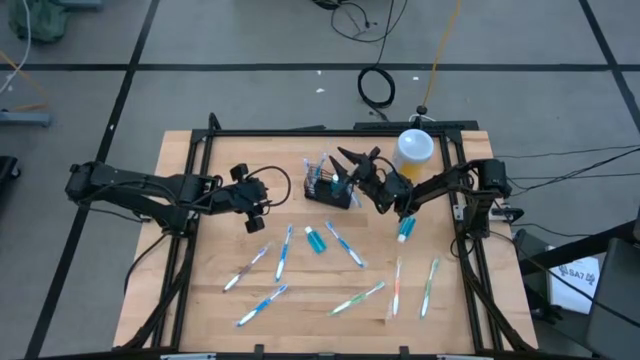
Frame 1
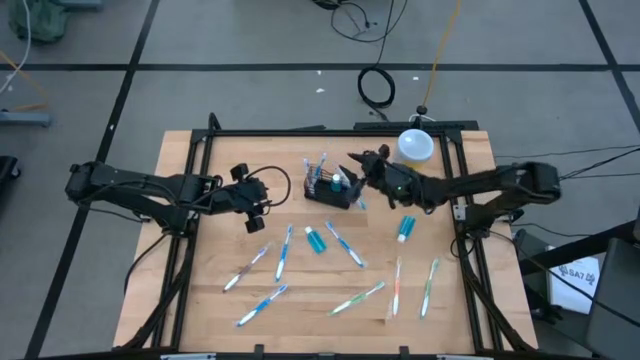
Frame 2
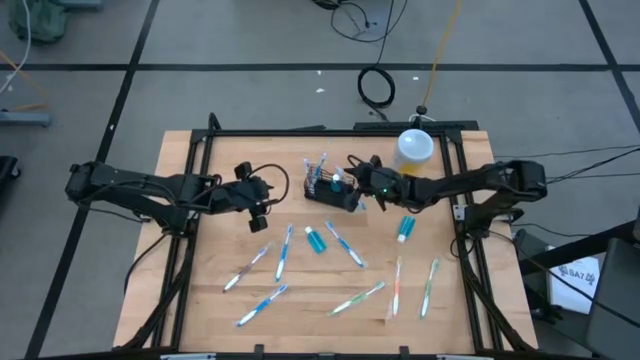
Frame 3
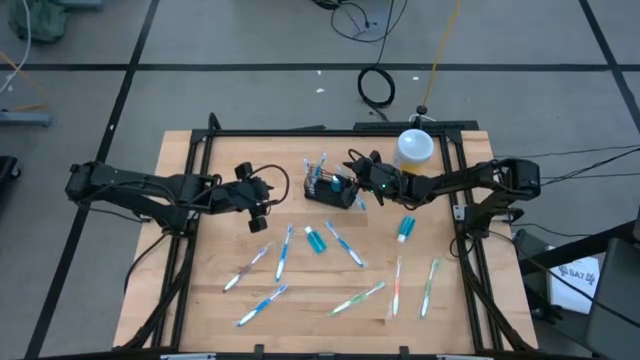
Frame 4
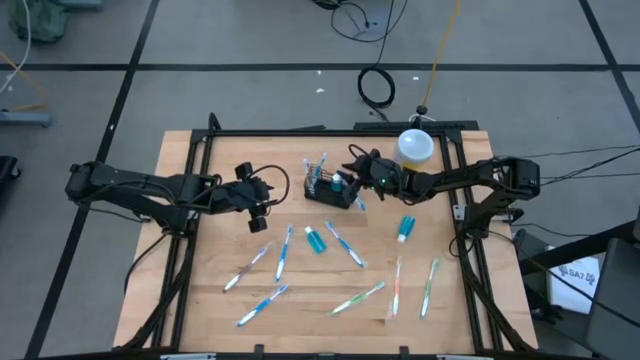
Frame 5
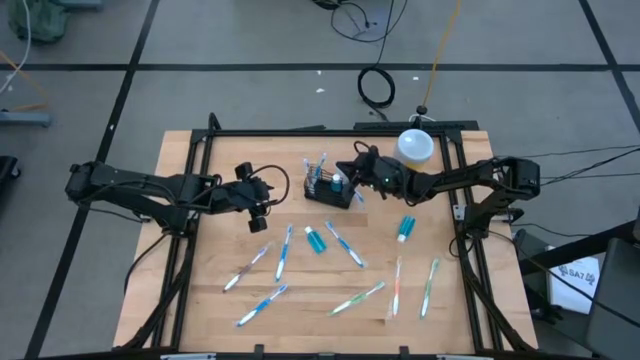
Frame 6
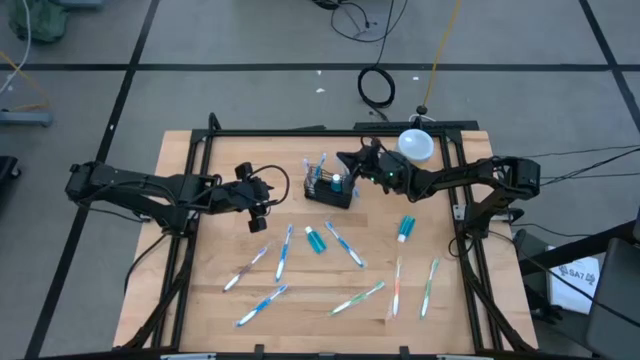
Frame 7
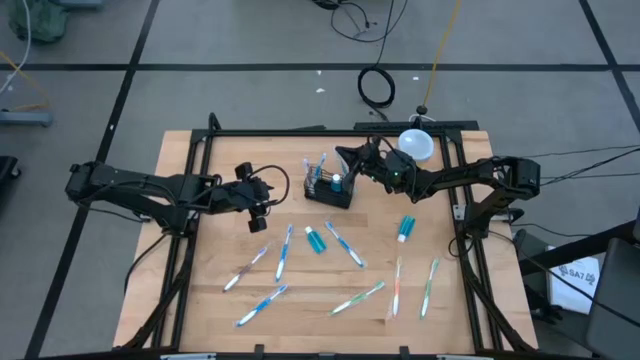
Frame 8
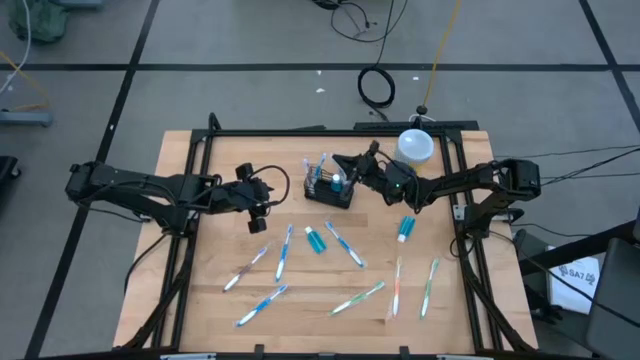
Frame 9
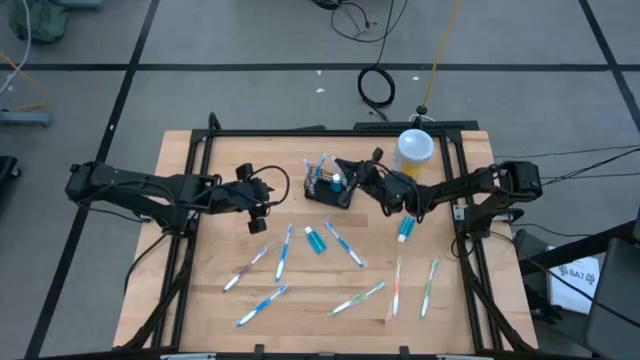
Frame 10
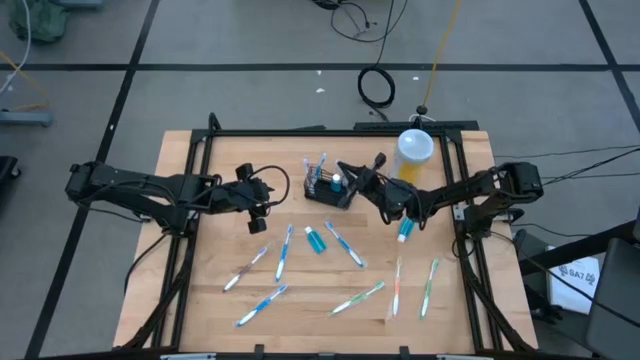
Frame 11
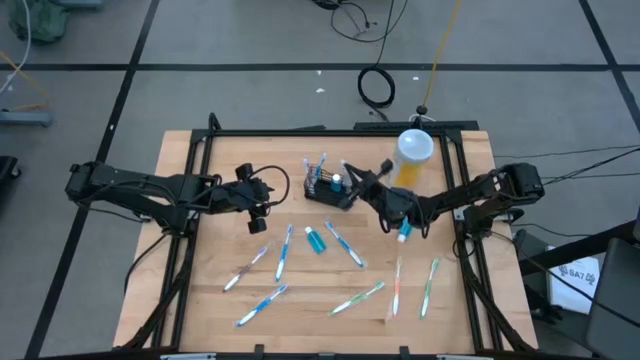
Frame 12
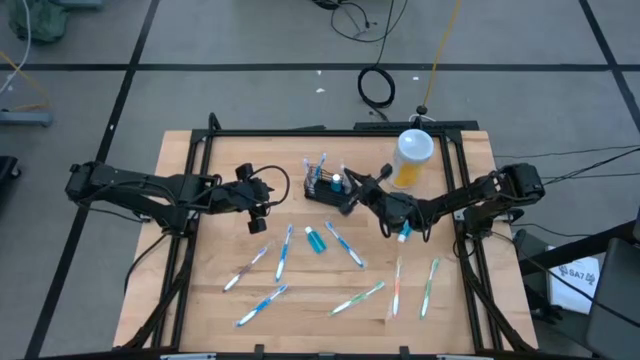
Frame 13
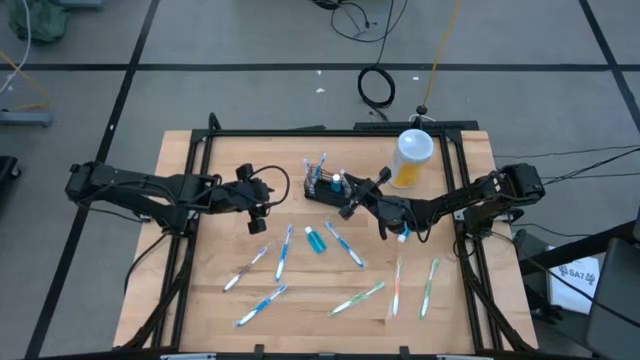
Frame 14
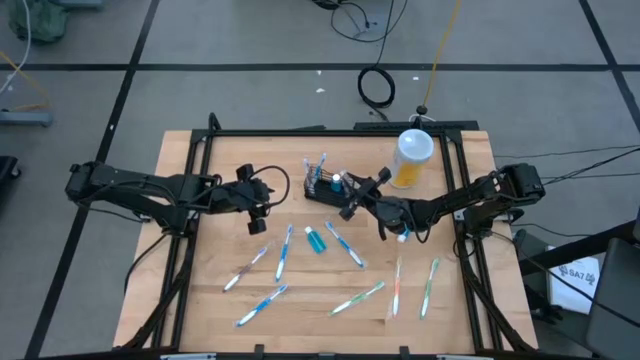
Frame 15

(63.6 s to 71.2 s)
Task: Pick & Place toothbrushing station
Adjust the blue toothbrush in the black wire organizer

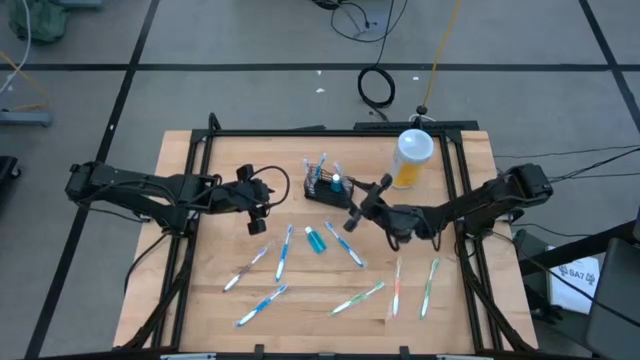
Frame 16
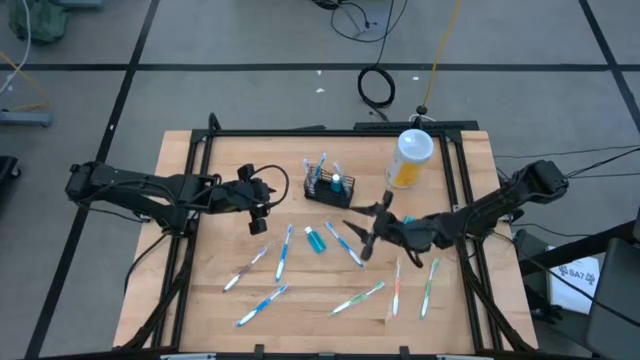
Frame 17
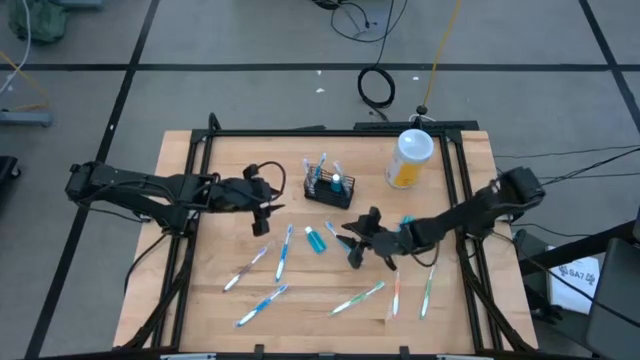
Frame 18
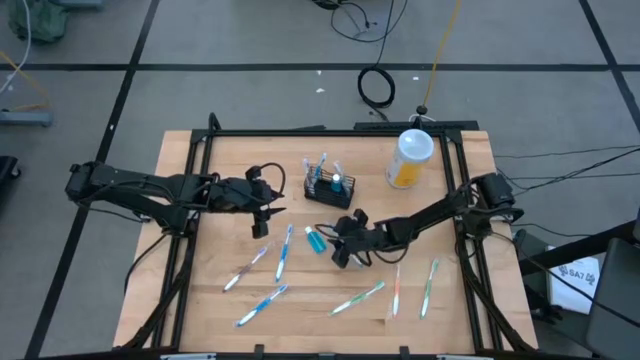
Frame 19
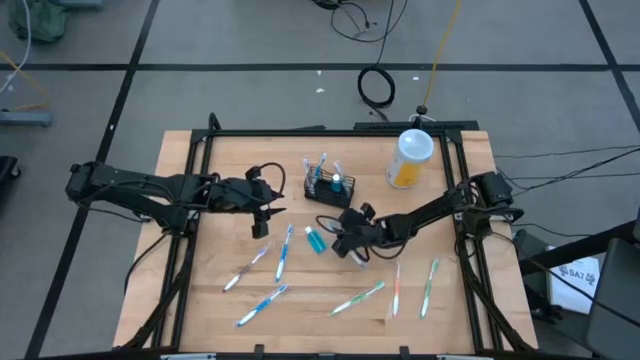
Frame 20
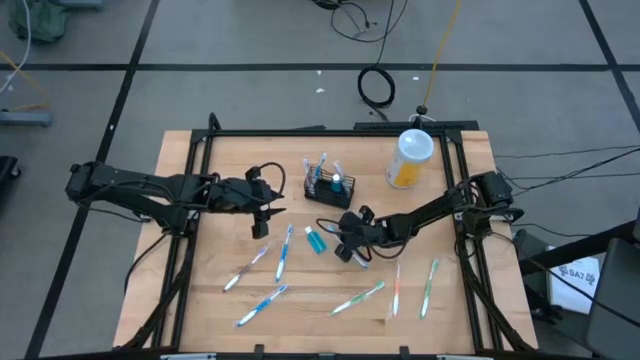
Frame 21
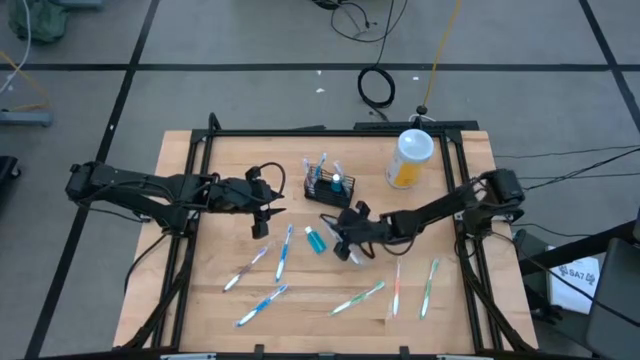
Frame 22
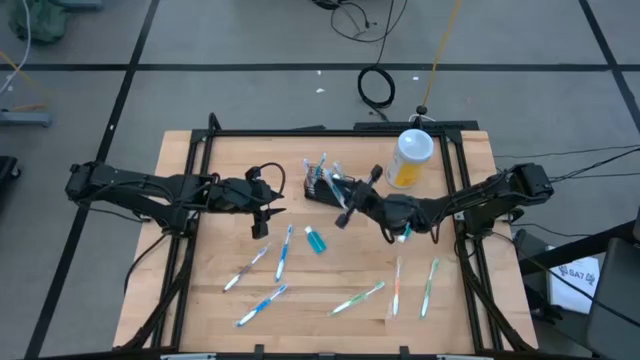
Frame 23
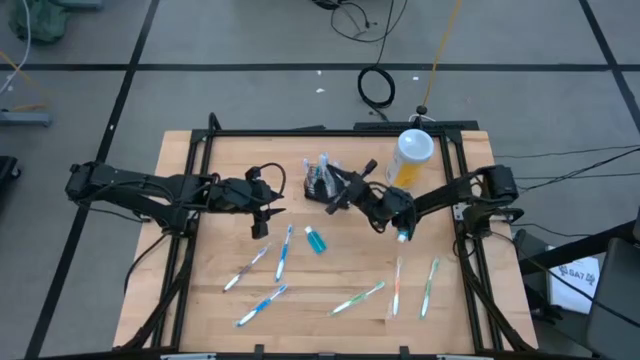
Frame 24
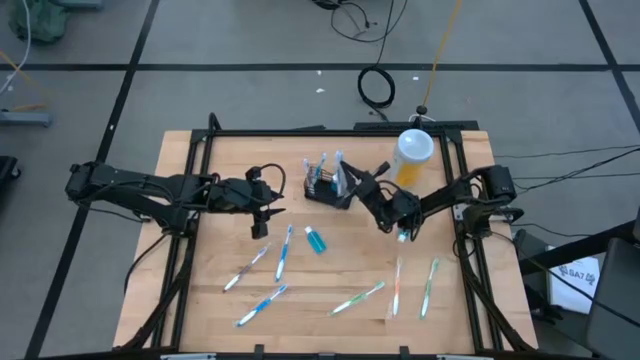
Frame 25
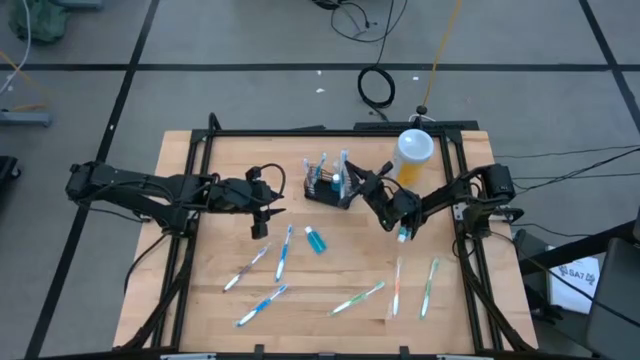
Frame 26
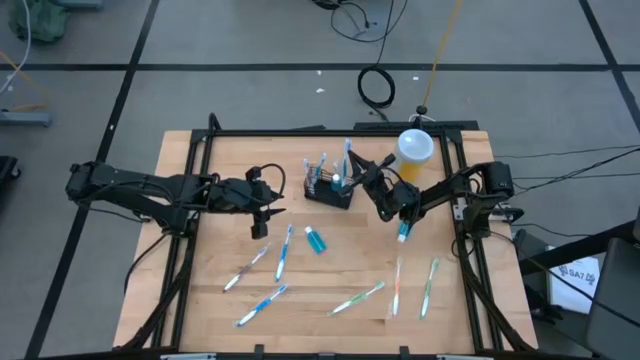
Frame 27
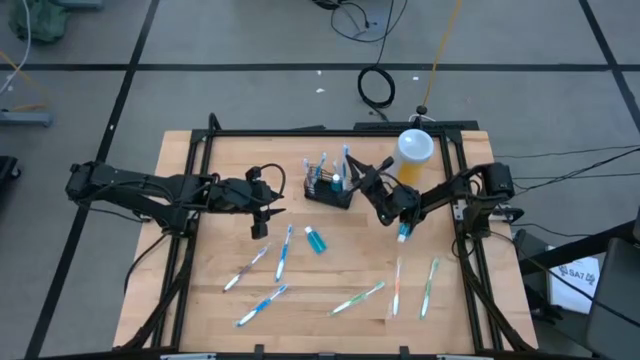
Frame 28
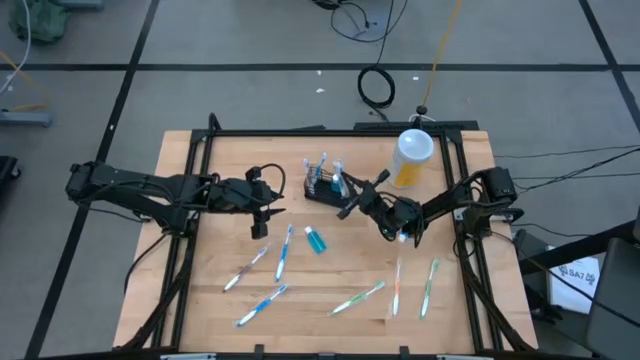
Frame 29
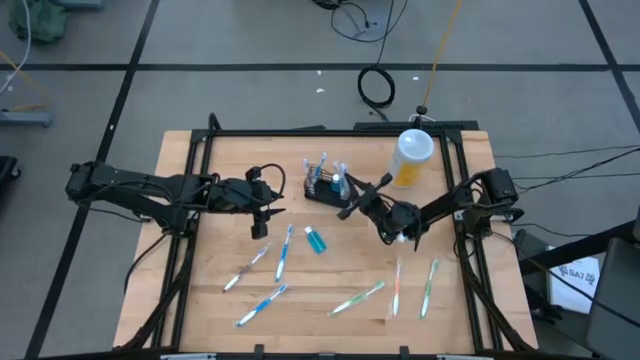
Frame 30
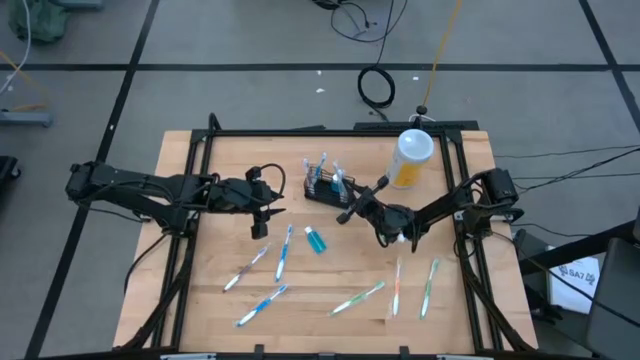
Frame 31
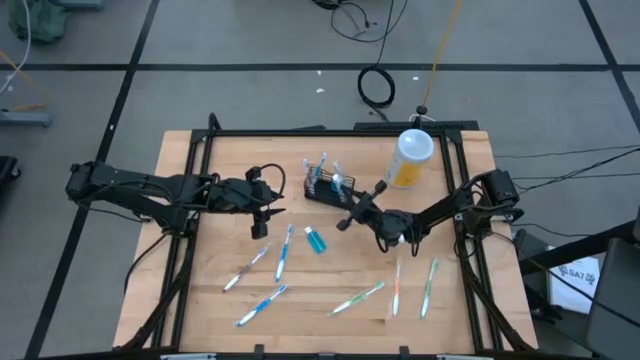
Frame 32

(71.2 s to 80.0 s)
Put the blue toothbrush into the black wire organizer

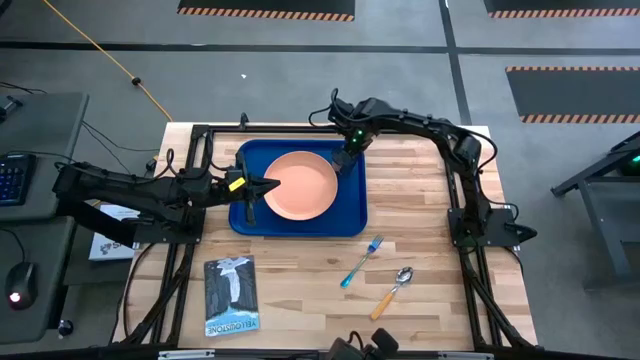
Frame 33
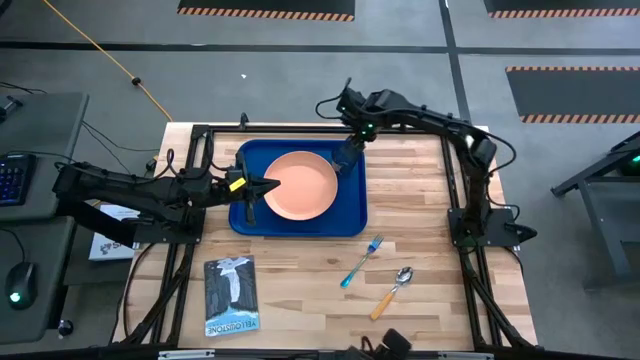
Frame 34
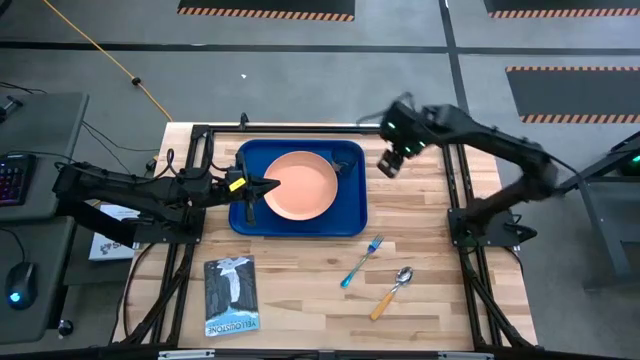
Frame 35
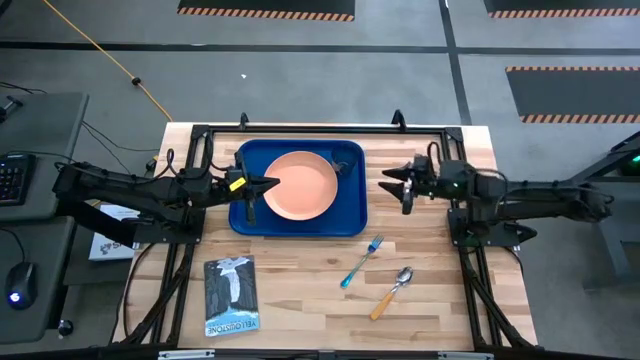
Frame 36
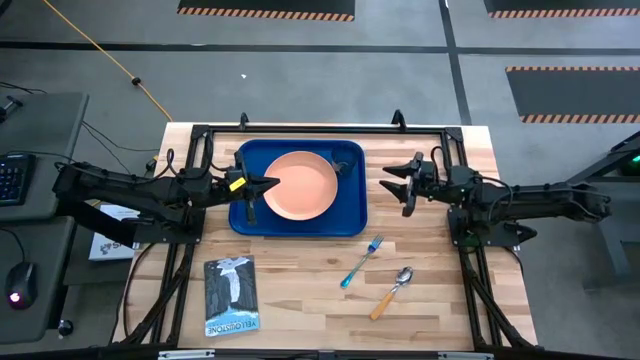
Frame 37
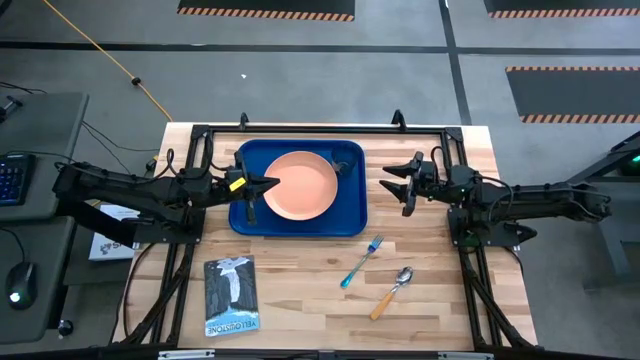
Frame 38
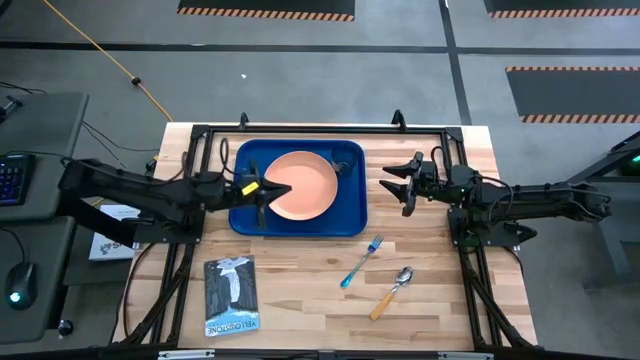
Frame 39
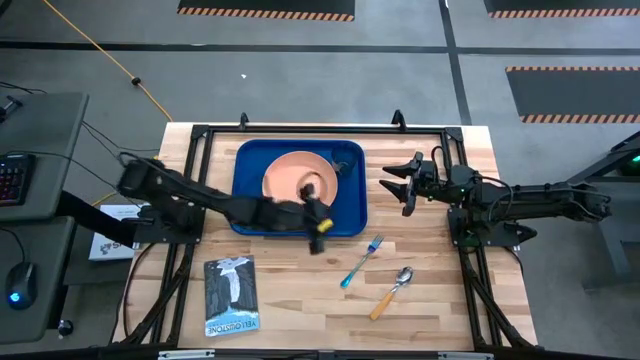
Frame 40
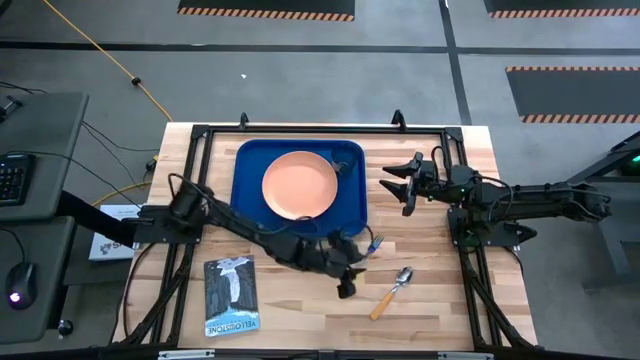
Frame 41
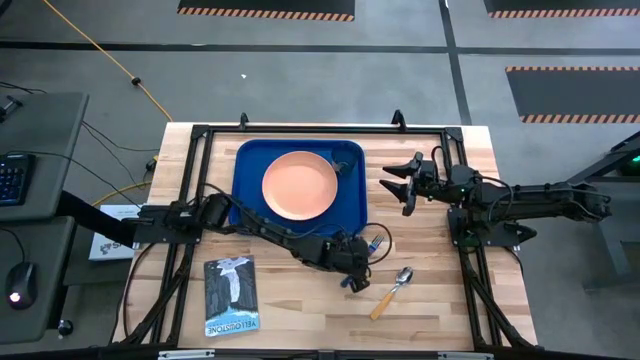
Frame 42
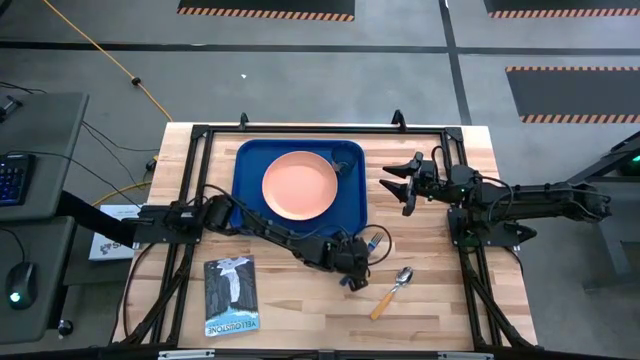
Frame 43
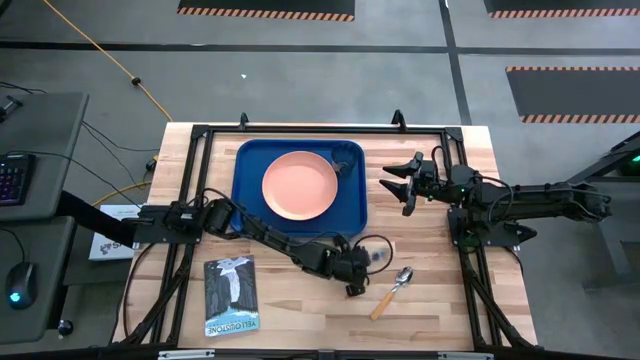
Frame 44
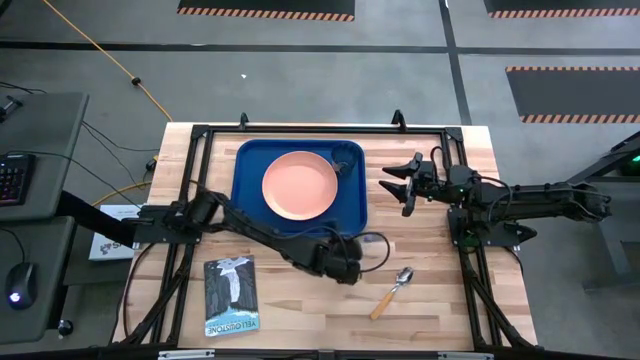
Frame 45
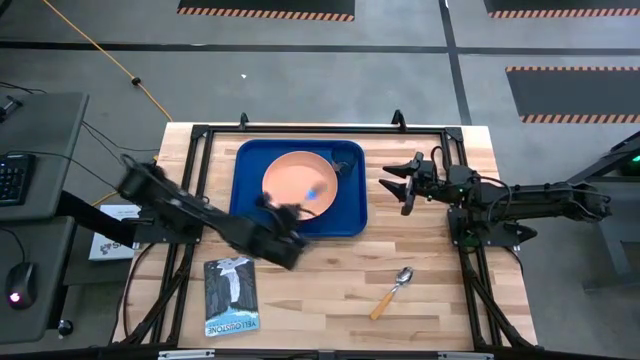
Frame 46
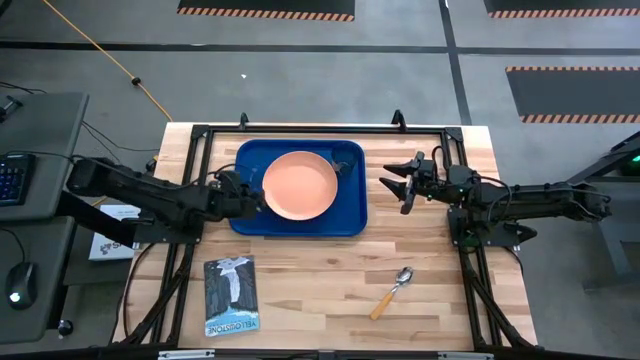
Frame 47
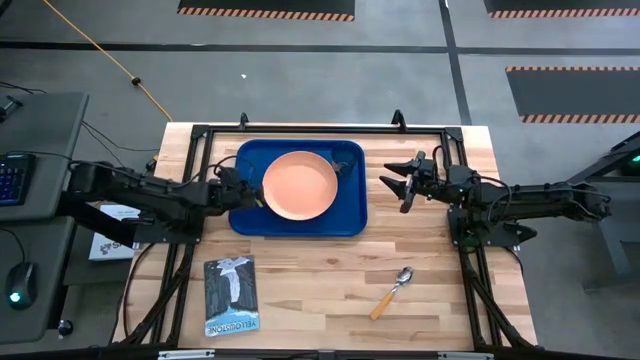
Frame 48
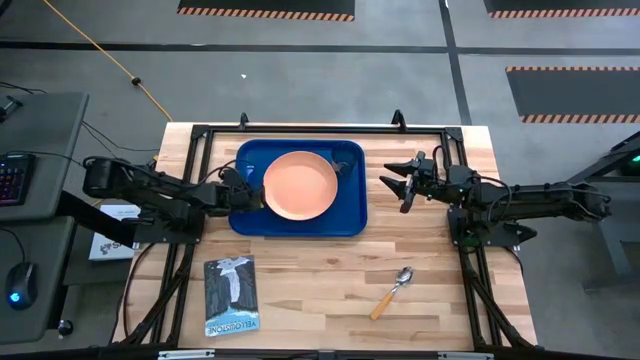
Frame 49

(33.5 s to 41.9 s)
Task: Pick and place plate/cup/fork/spoon on tray
Put the blue fork on the blue tray
